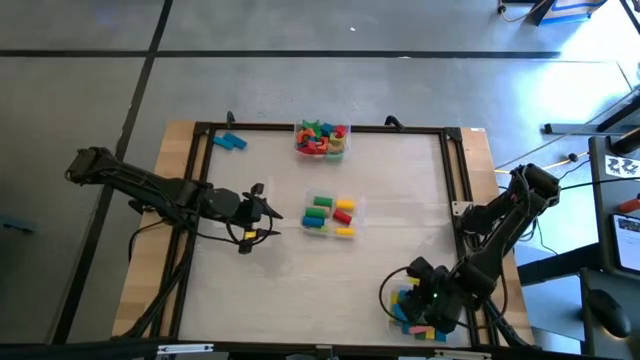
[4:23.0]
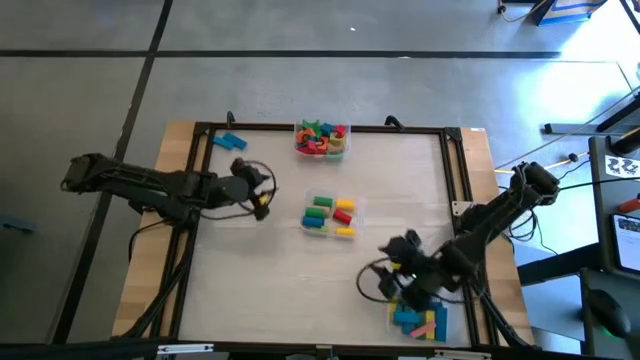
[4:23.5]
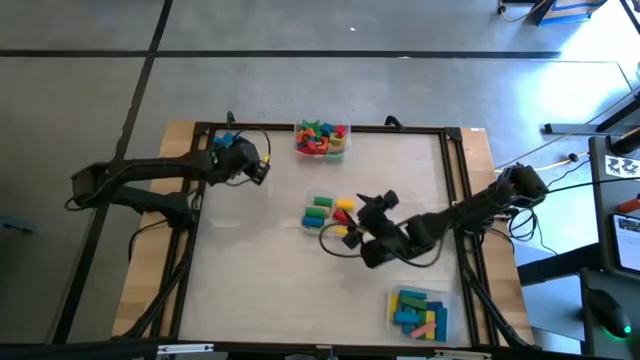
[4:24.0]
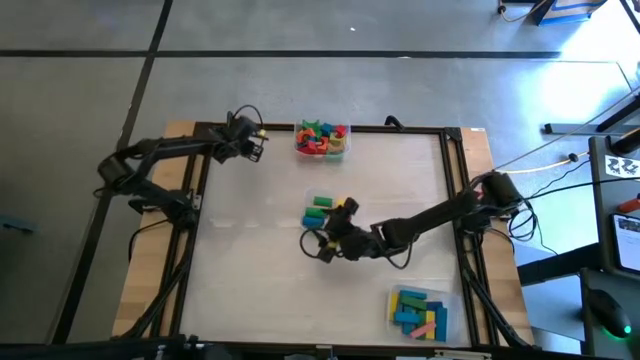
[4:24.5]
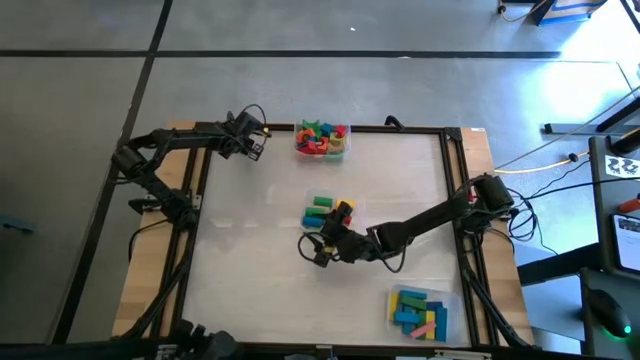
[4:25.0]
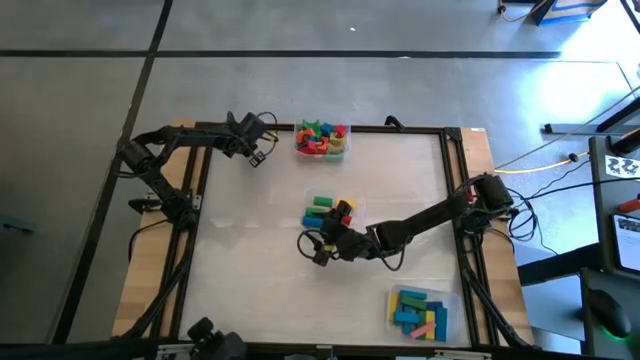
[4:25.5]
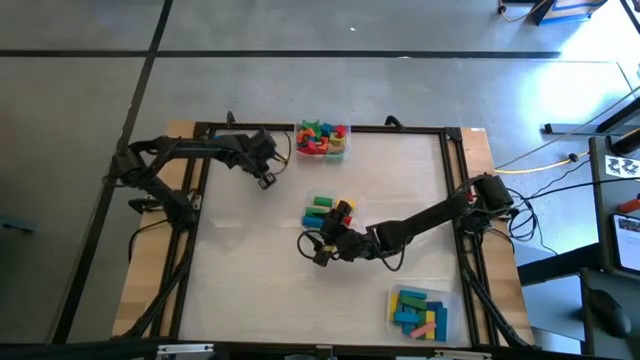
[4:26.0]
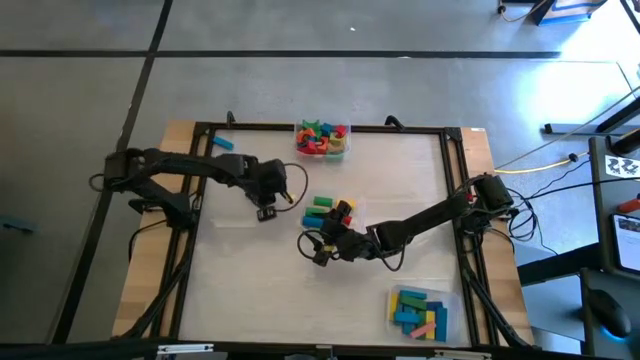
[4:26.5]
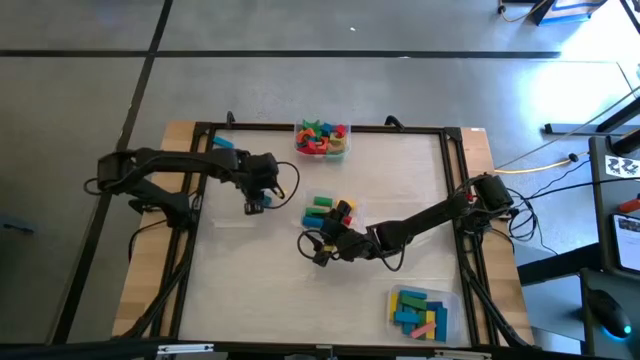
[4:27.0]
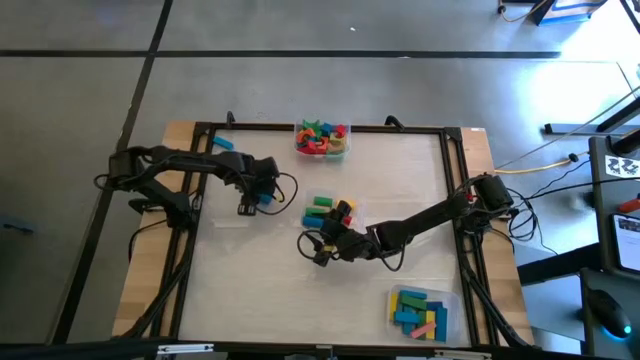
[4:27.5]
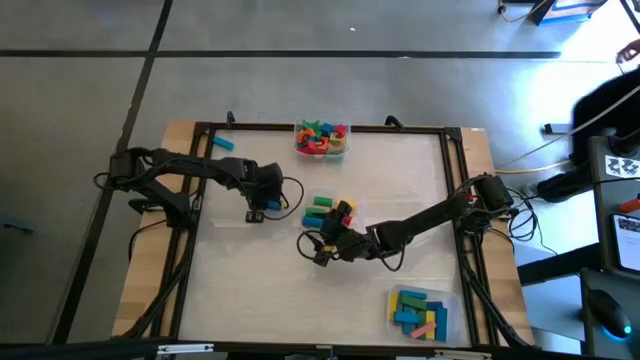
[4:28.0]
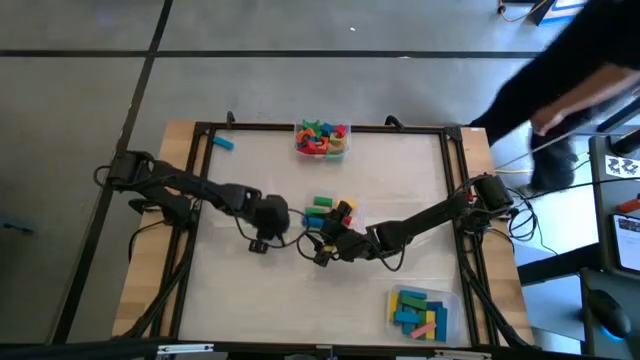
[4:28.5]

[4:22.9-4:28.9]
Task: Sort blocks by size
Move the blue rectangle block to the center of the table

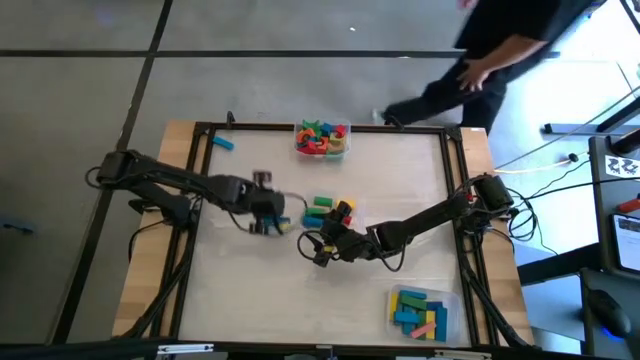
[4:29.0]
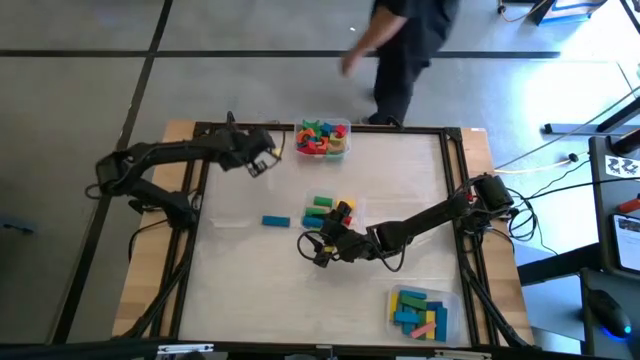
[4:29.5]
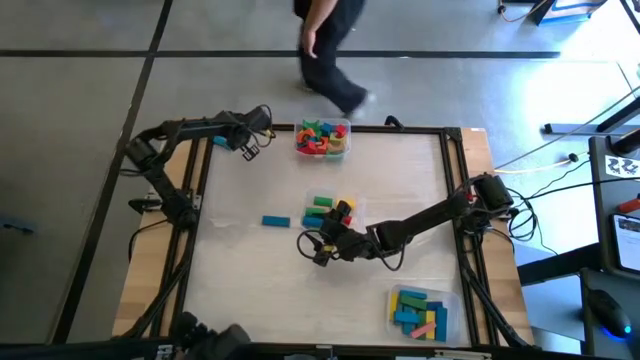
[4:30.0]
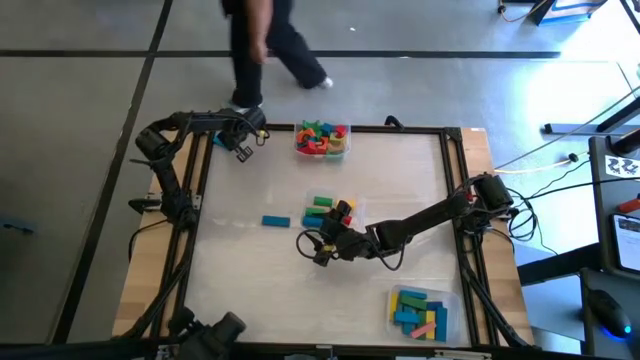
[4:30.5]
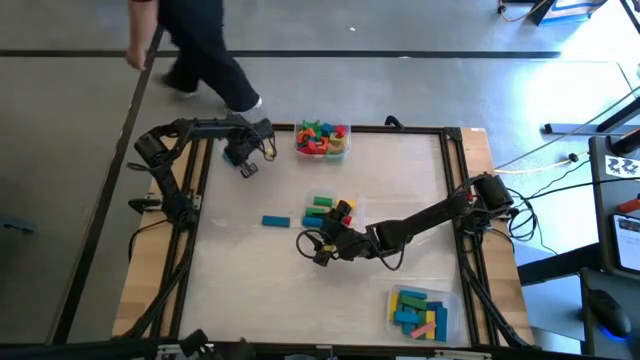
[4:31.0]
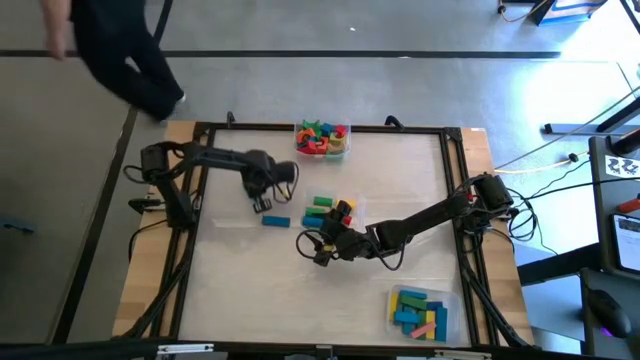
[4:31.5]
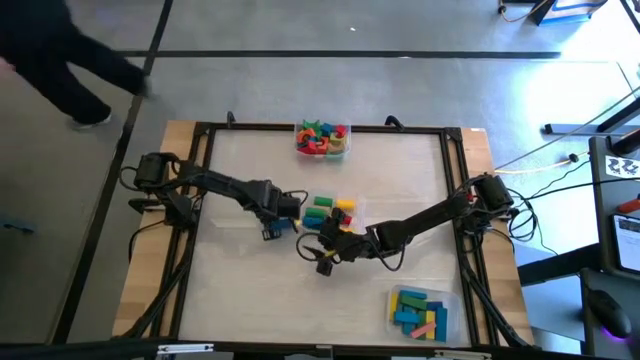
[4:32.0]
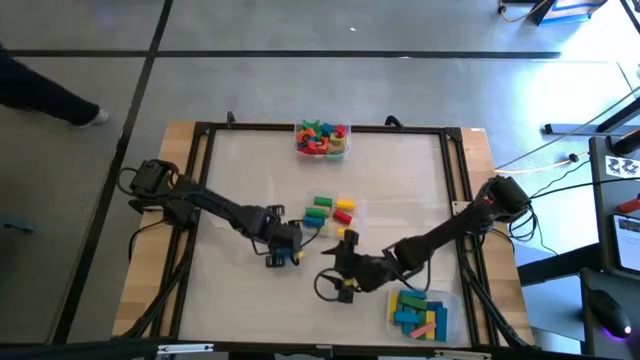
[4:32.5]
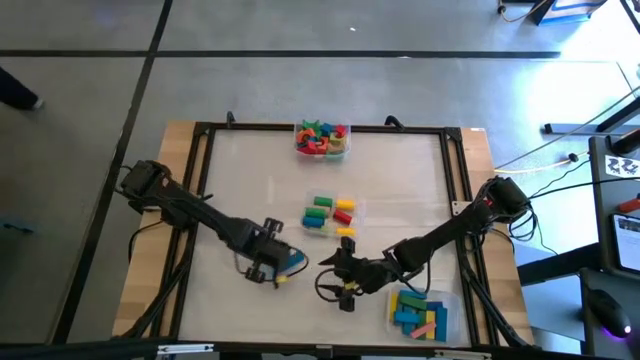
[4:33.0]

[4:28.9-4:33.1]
Move the blue rectangle block to the center of the table

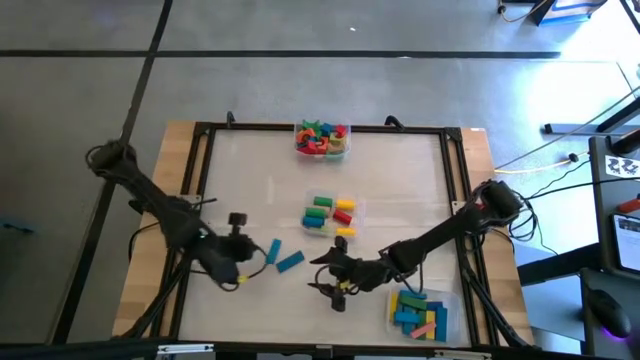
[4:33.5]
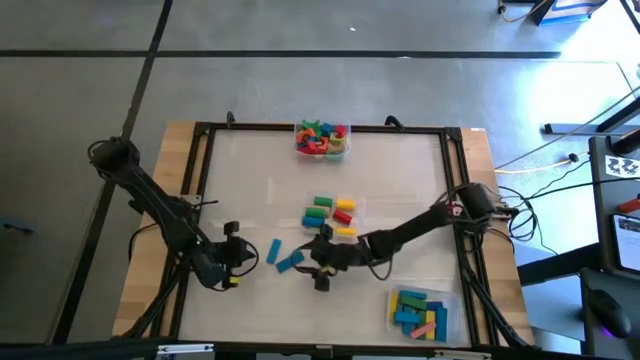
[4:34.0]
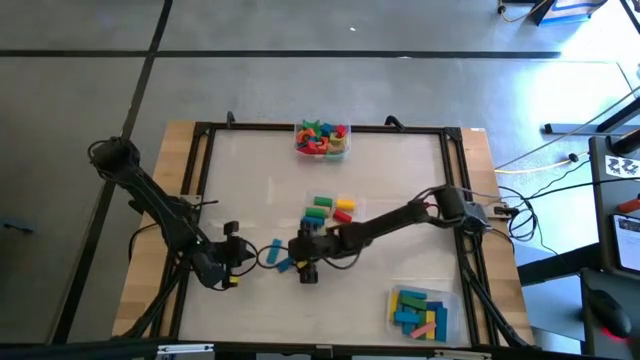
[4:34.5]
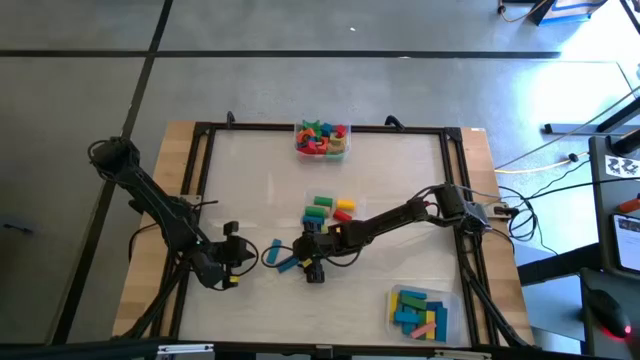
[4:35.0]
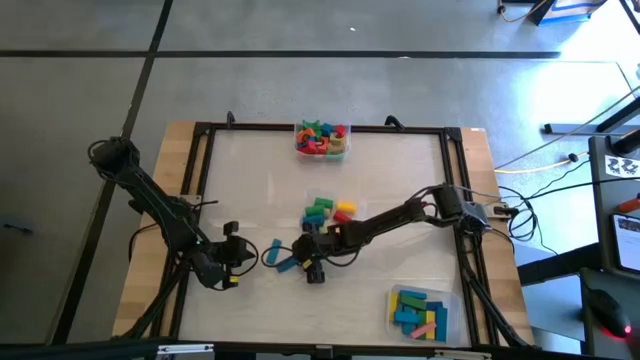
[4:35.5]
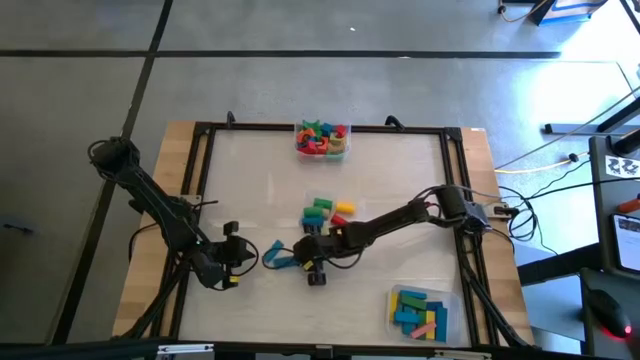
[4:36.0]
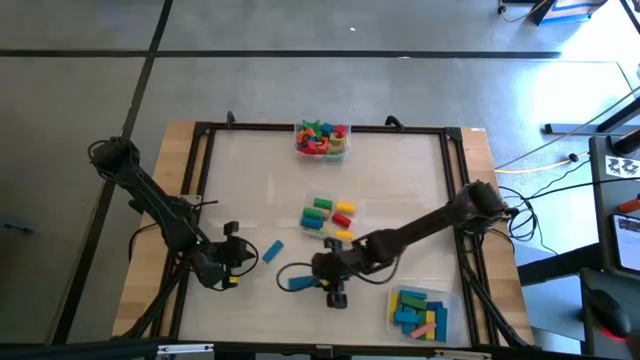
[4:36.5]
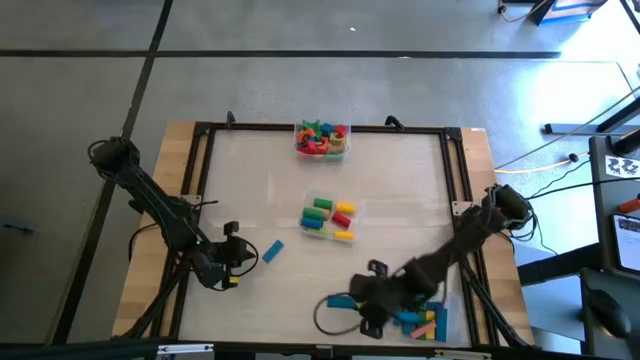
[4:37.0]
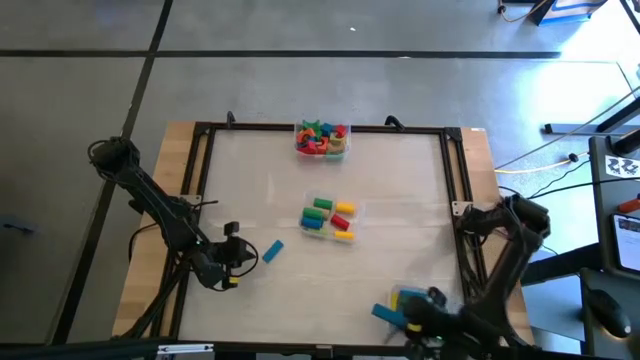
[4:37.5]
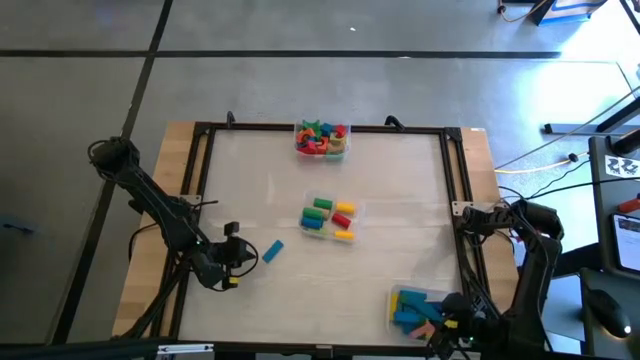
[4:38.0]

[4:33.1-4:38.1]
Put the blue rectangle block into the bottom transparent bin

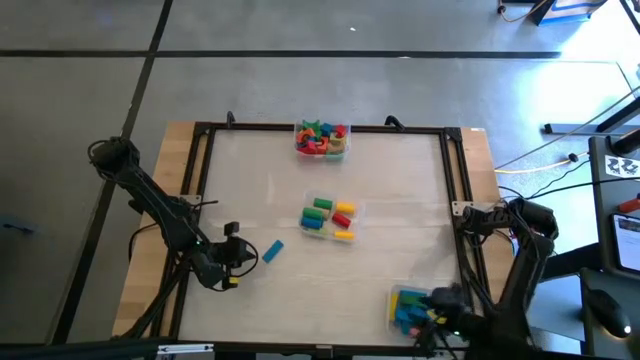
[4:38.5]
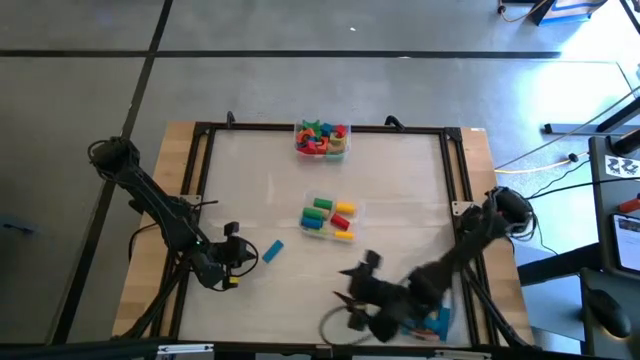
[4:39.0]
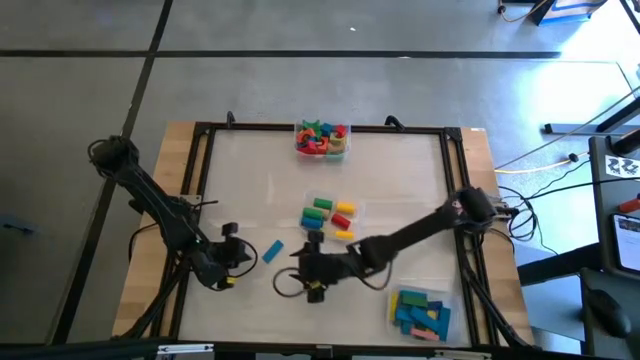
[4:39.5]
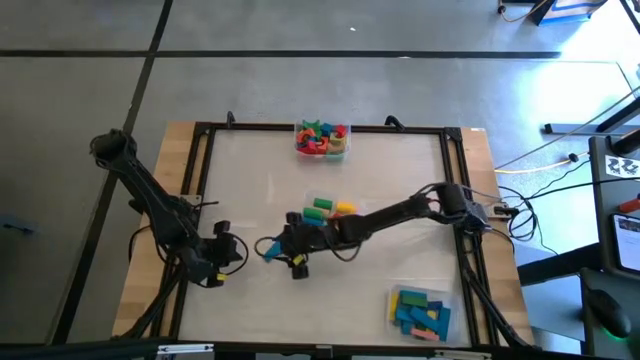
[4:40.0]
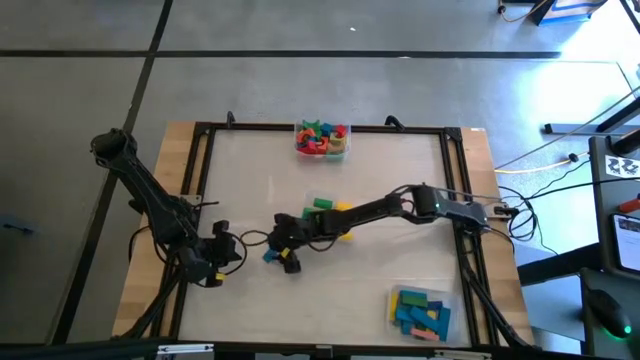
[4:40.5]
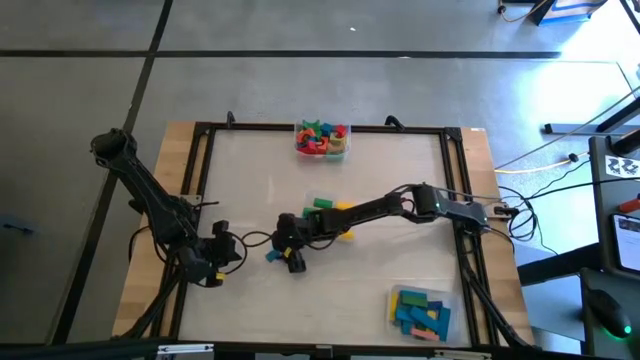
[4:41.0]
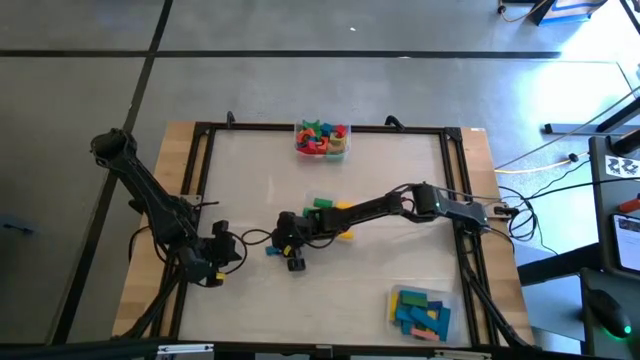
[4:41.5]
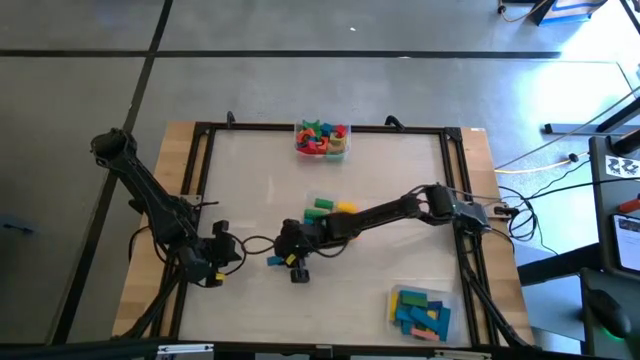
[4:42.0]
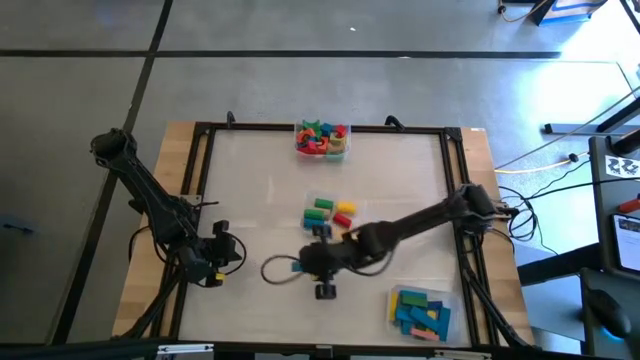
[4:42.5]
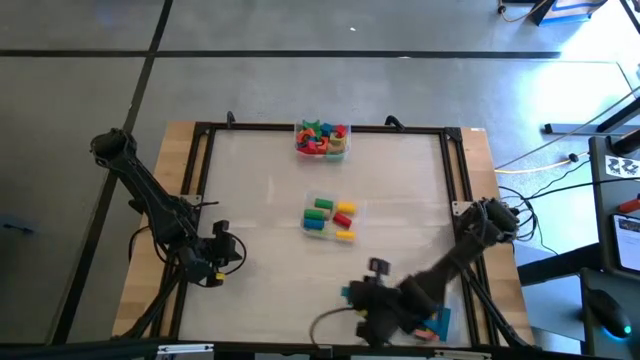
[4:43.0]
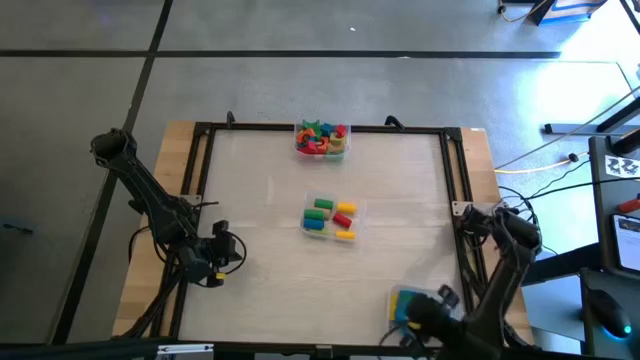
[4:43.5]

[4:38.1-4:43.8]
Put the blue rectangle block into the bottom transparent bin

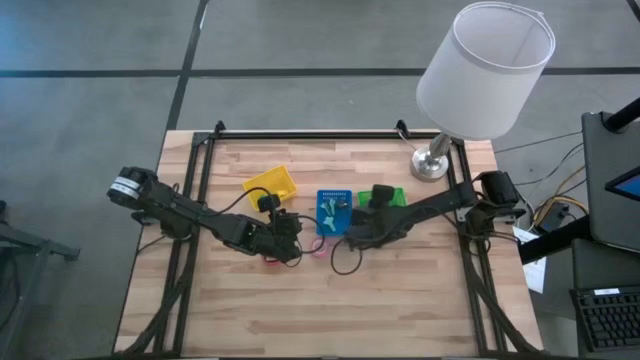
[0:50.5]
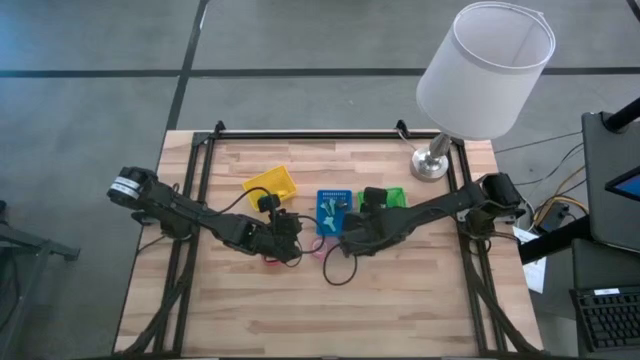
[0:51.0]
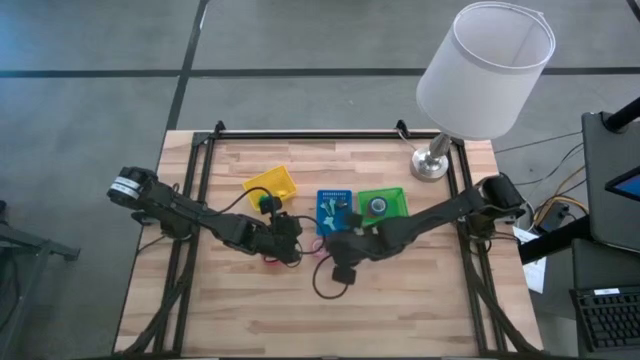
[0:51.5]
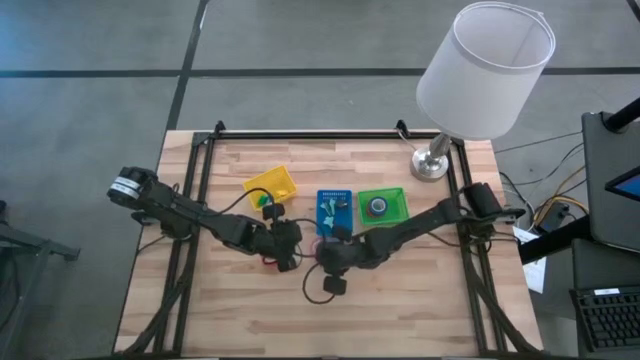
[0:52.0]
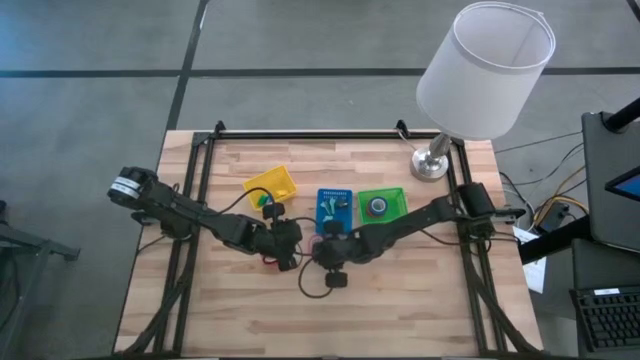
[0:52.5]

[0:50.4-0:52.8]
Task: Pick and place Stapler, Stapler remover, tape
Put the pink tape into the green basket
